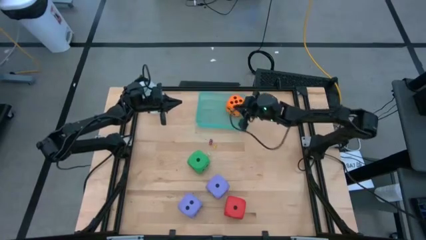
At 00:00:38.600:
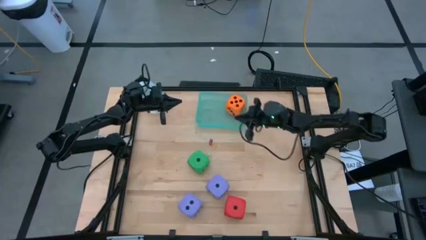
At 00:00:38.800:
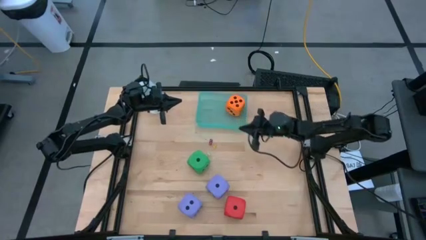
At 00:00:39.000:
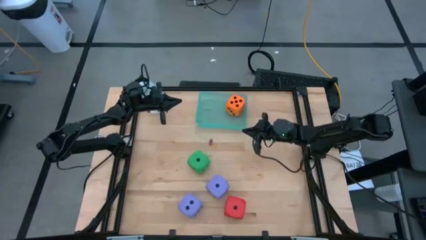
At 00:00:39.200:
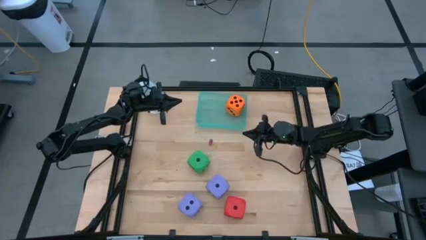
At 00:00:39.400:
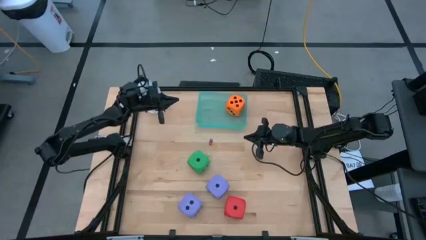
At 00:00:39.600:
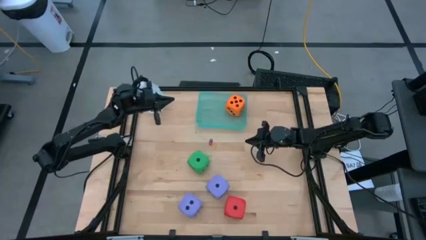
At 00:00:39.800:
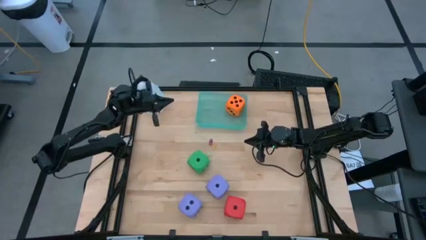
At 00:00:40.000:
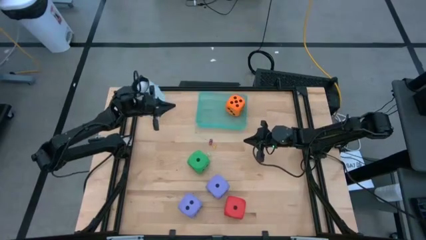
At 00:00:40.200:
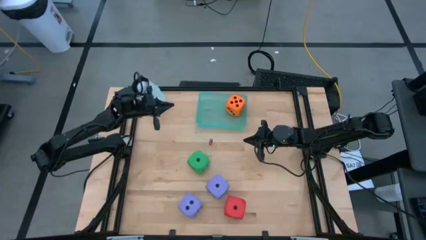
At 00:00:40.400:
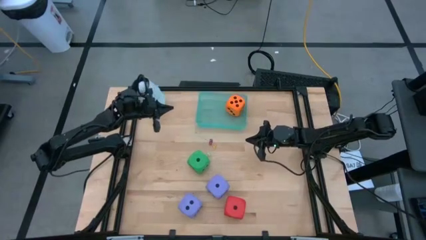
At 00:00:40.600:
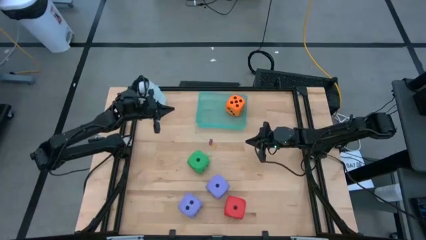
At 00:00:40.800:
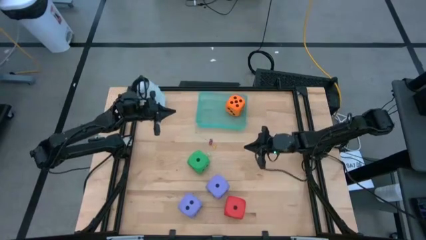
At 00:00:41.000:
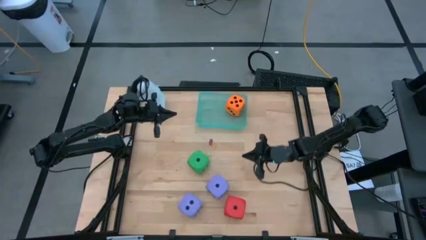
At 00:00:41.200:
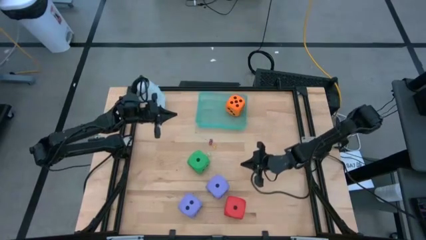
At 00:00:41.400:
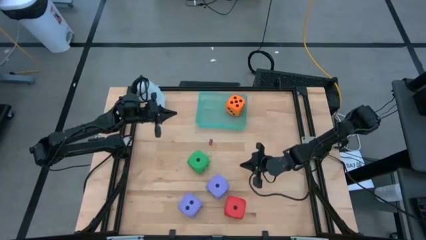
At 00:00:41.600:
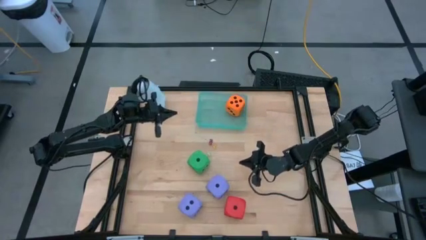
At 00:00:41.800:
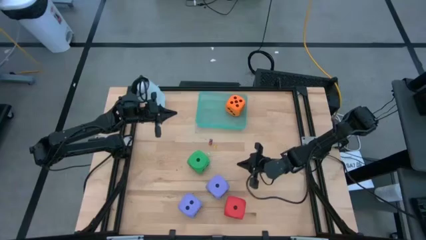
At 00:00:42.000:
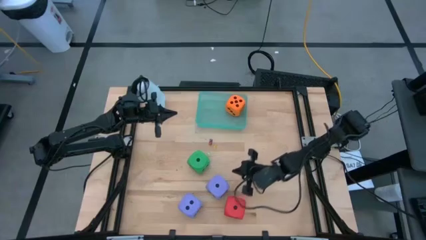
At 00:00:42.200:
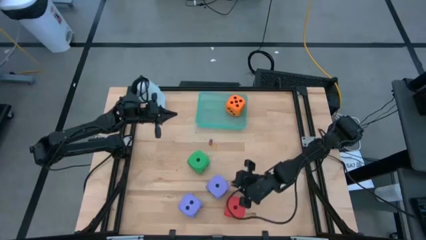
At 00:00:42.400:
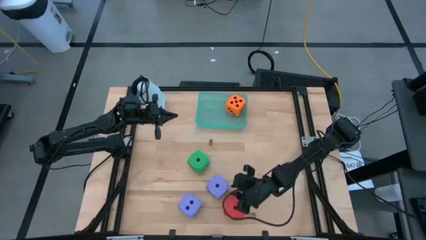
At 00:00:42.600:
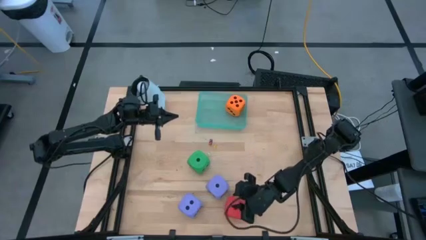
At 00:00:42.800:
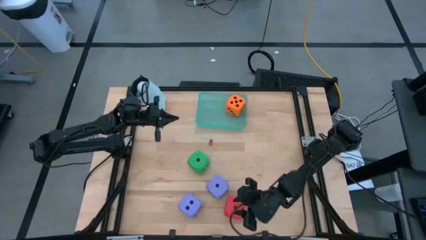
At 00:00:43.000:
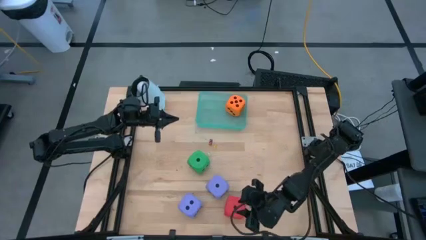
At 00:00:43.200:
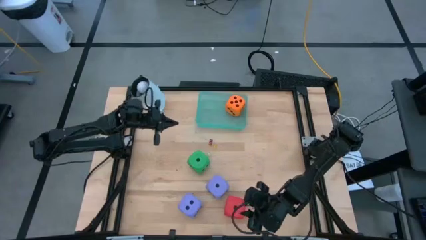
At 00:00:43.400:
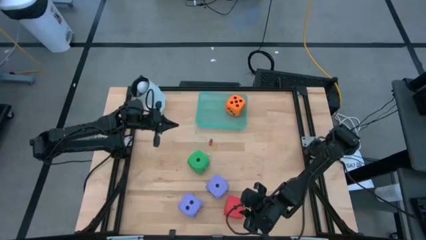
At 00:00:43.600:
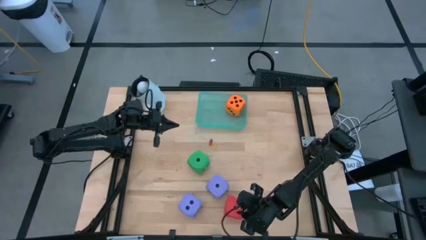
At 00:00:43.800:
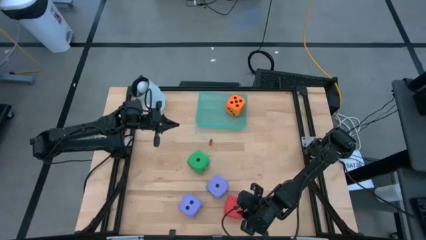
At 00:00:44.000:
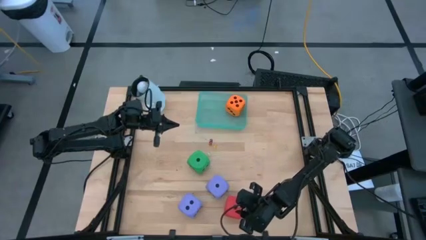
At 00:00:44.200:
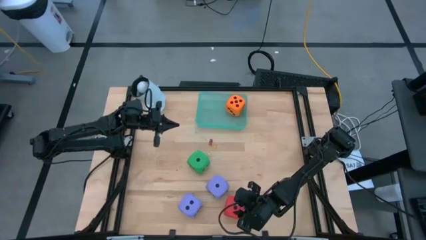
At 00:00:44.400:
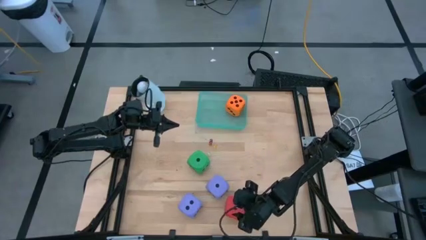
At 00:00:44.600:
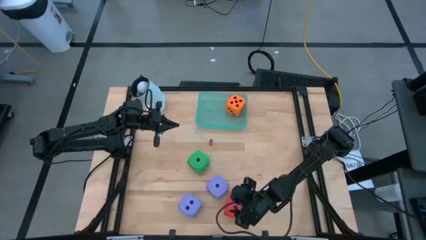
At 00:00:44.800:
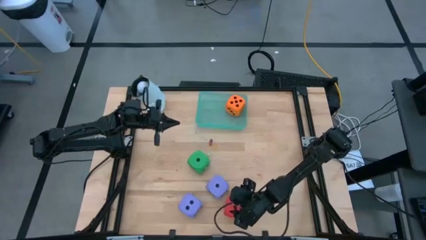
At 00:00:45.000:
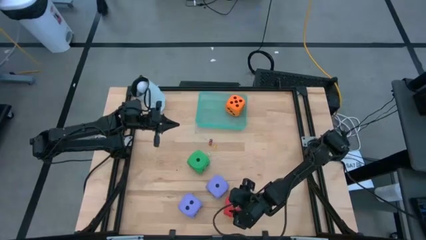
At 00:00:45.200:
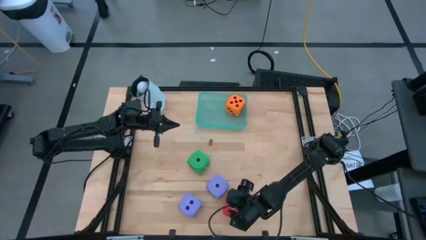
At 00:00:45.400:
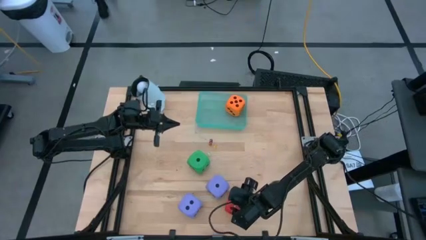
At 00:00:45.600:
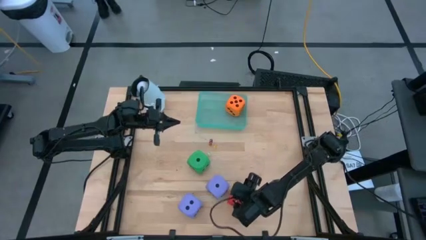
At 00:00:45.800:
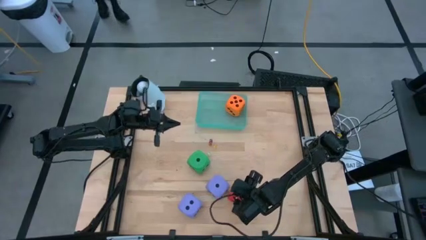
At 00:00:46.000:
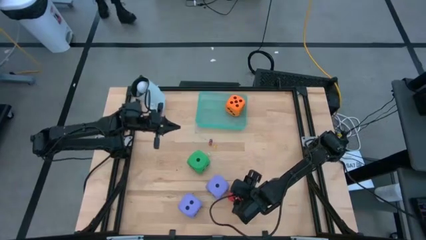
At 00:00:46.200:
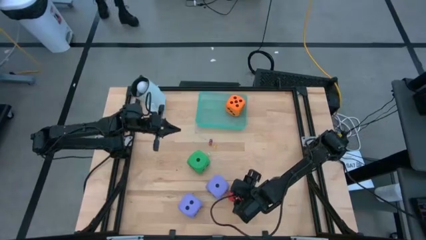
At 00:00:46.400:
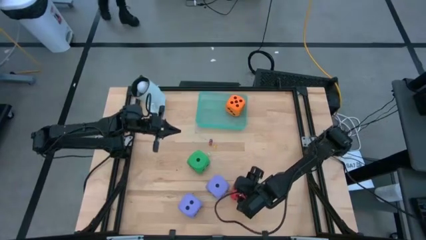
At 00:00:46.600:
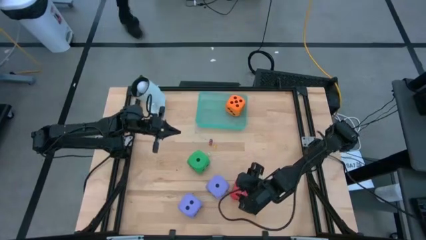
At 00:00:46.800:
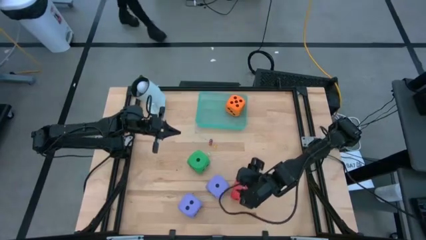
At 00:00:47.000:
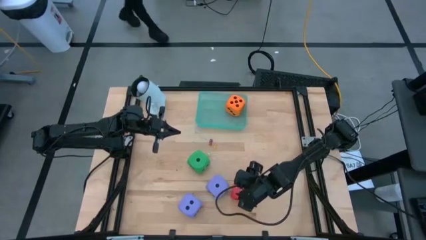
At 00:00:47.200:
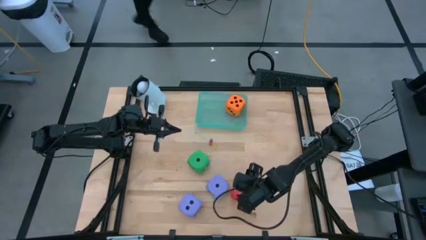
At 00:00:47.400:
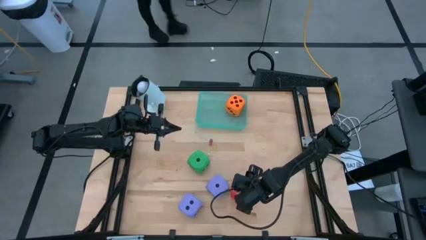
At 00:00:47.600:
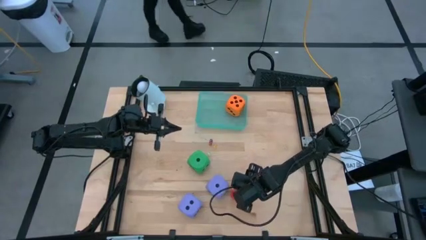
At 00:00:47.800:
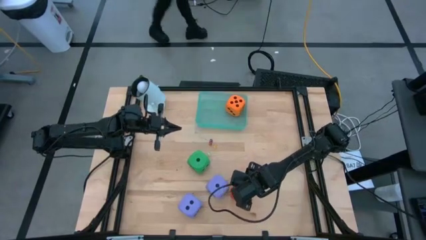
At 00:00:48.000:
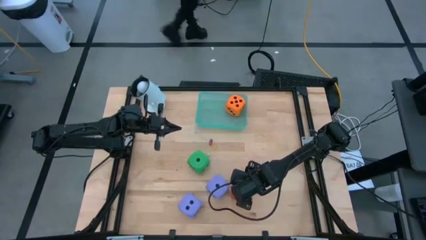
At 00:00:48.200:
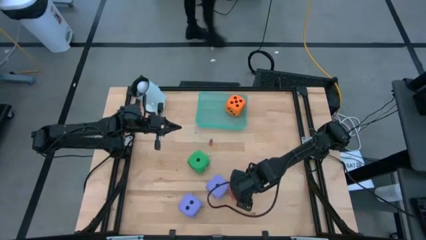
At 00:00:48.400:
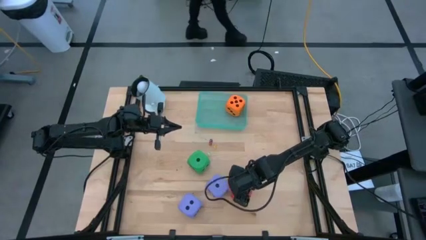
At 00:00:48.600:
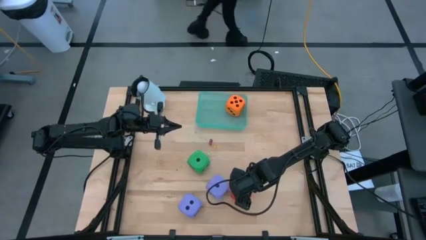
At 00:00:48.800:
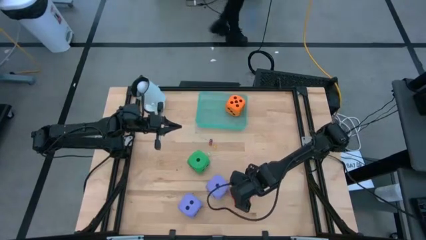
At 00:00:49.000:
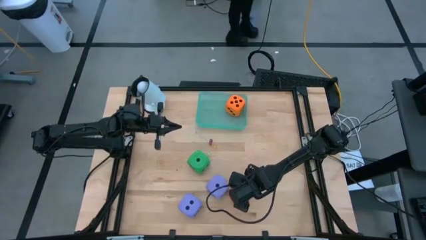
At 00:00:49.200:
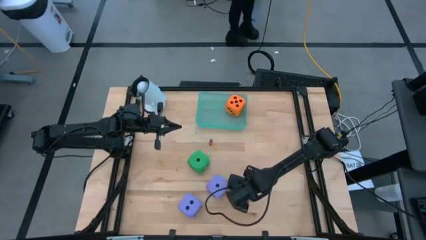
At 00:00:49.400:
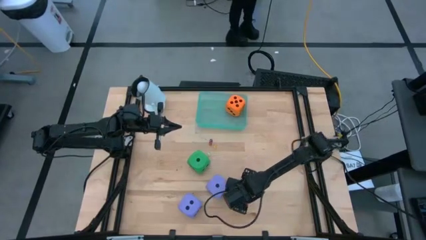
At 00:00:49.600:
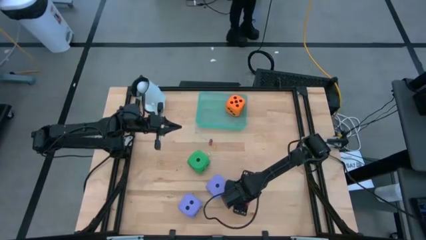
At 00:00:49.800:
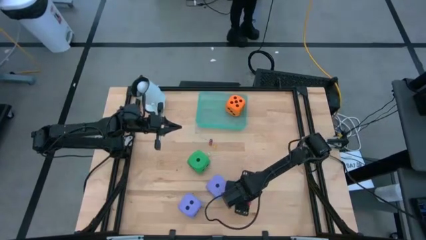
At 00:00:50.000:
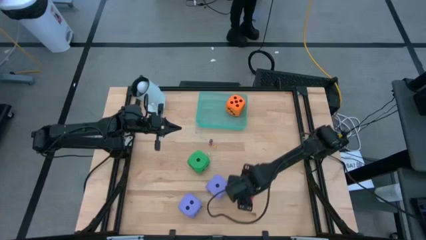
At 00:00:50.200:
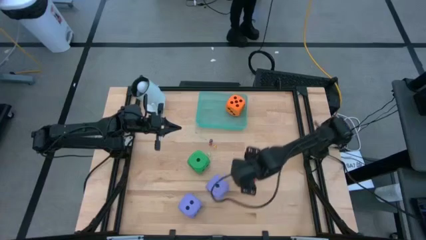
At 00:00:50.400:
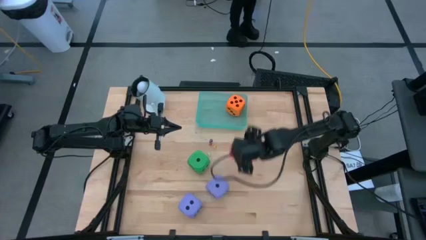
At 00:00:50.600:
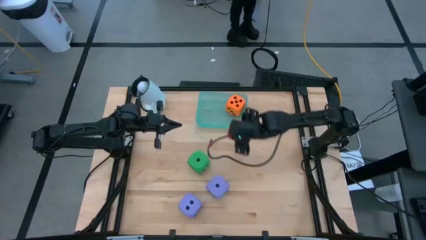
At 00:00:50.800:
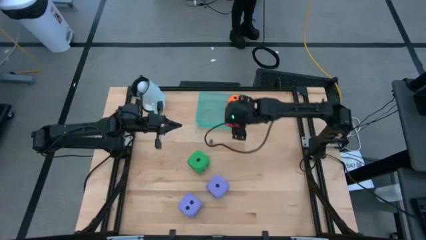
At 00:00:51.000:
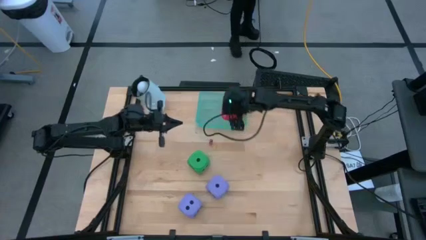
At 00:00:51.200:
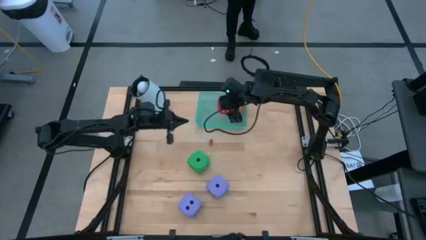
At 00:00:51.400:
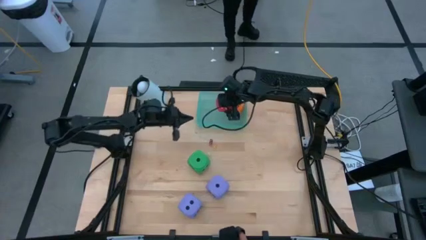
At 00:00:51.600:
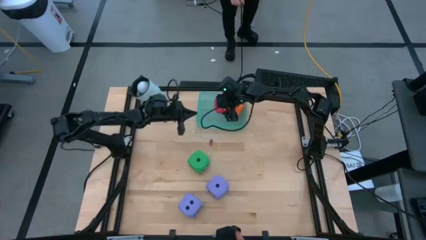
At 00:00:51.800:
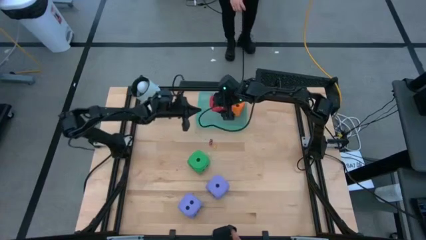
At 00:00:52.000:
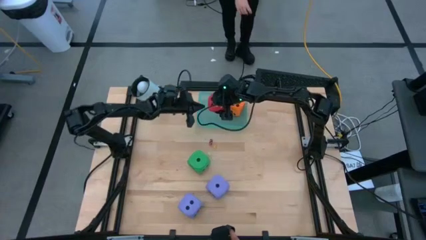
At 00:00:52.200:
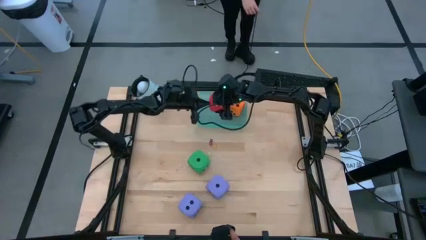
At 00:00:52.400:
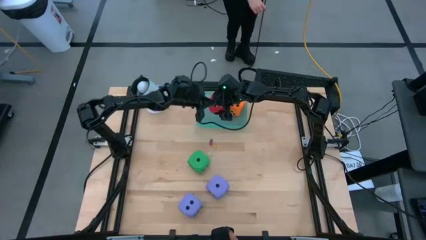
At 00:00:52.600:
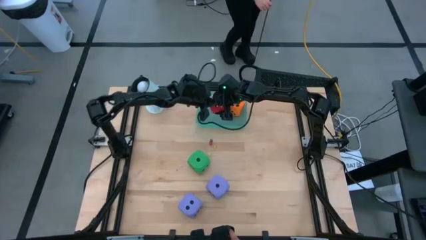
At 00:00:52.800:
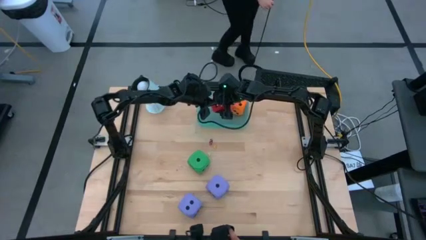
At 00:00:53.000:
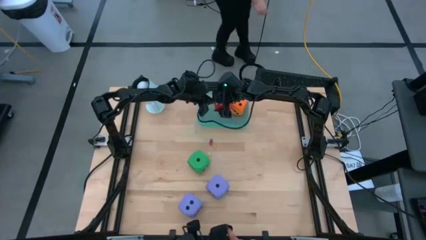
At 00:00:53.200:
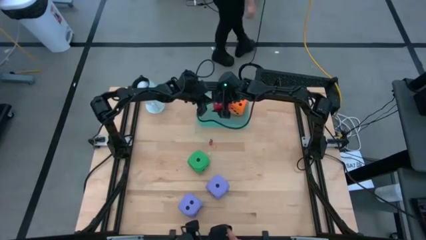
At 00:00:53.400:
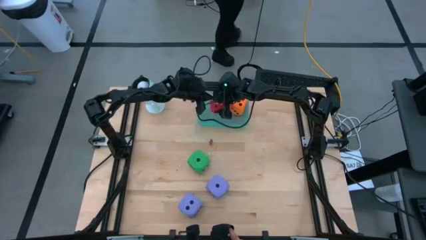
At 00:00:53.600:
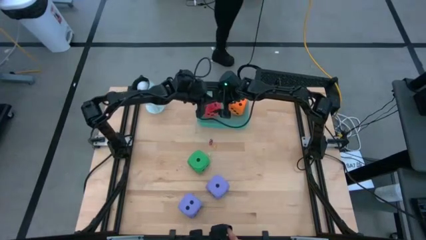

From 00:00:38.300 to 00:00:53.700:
Task: Pick & Place Dice
Put the big red dice into the bin
